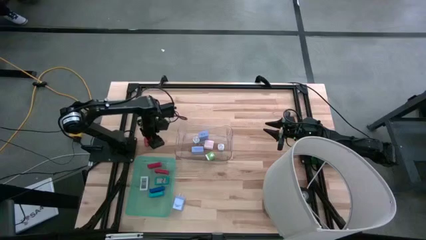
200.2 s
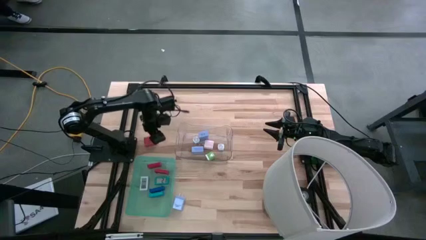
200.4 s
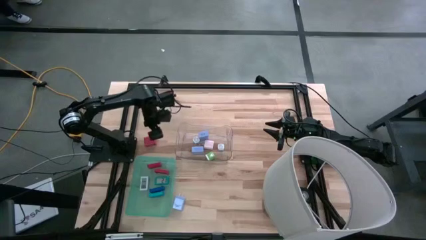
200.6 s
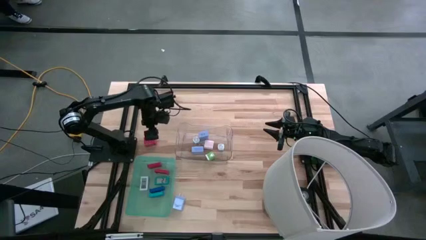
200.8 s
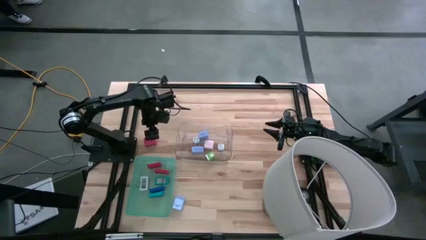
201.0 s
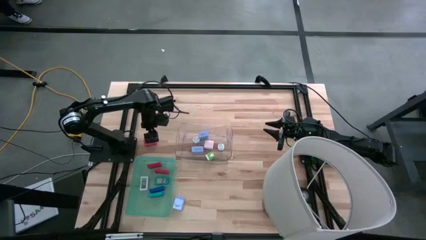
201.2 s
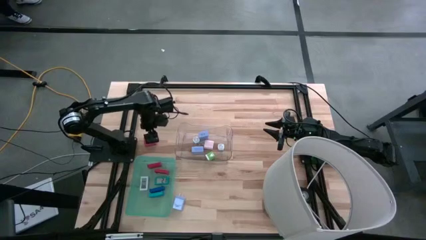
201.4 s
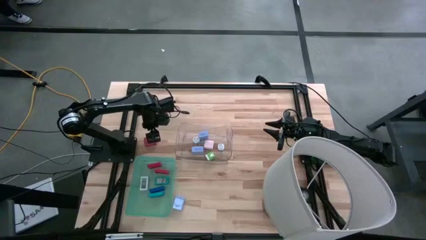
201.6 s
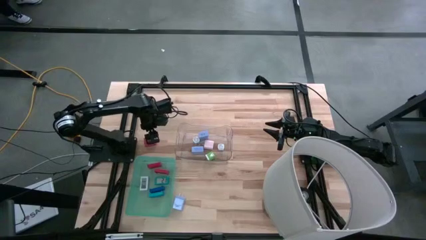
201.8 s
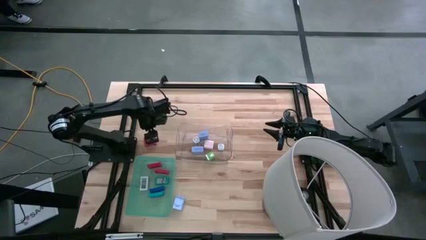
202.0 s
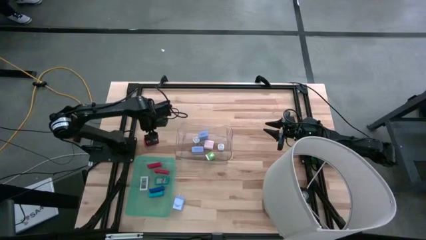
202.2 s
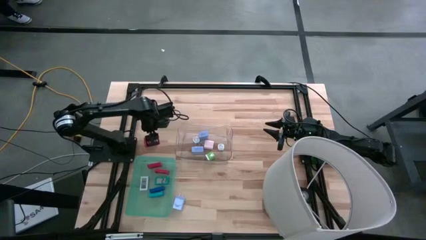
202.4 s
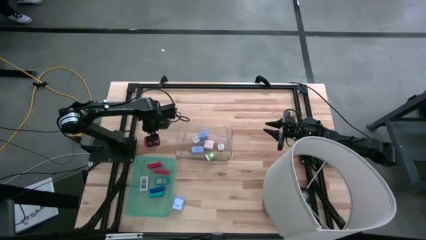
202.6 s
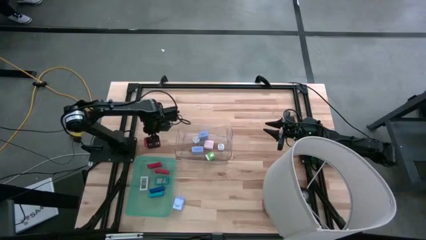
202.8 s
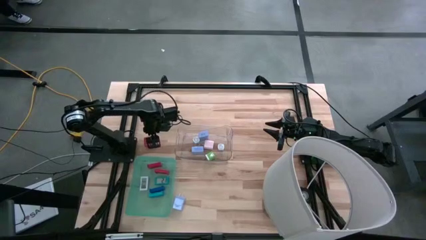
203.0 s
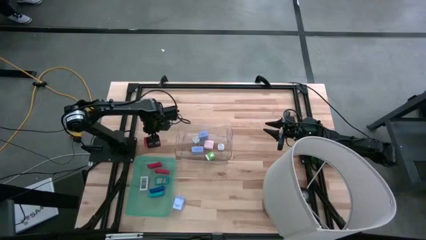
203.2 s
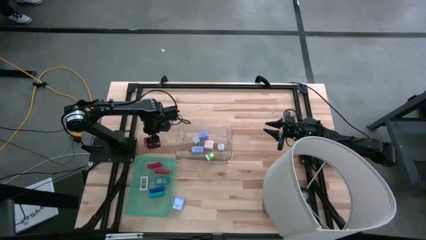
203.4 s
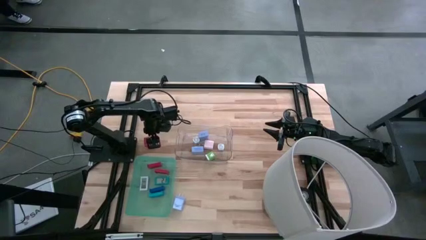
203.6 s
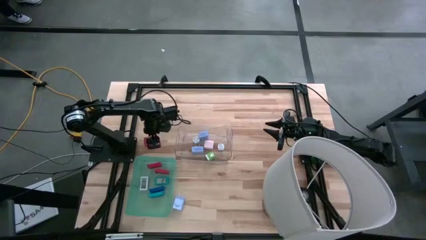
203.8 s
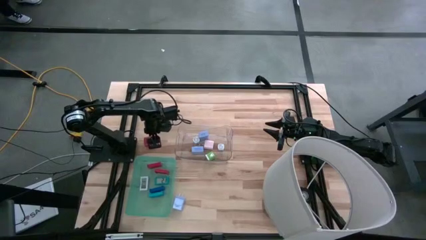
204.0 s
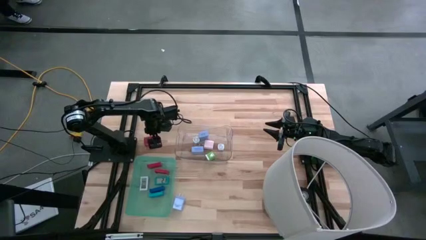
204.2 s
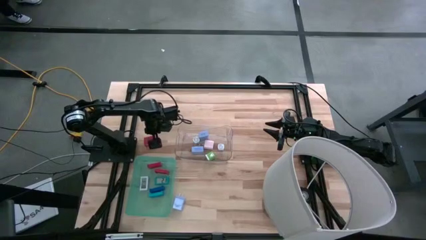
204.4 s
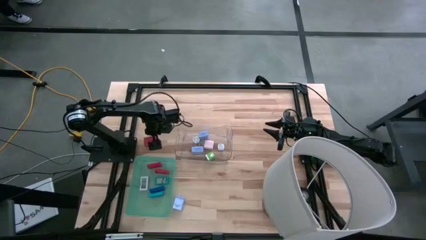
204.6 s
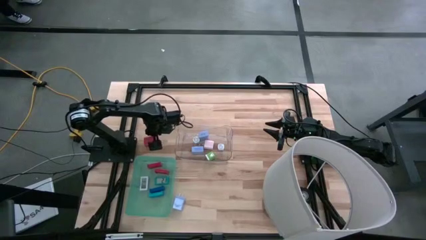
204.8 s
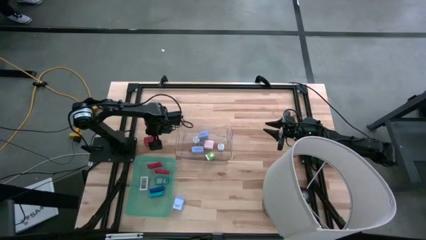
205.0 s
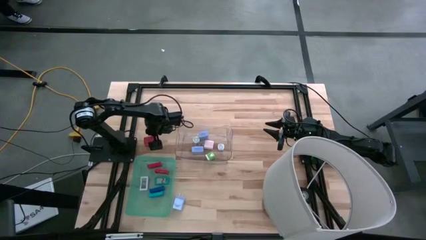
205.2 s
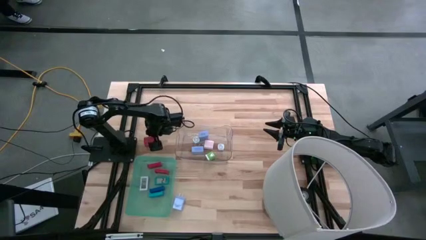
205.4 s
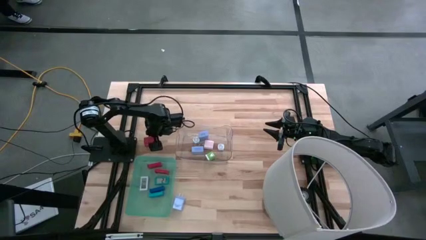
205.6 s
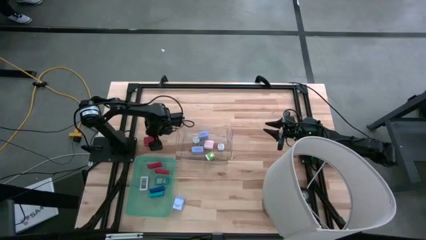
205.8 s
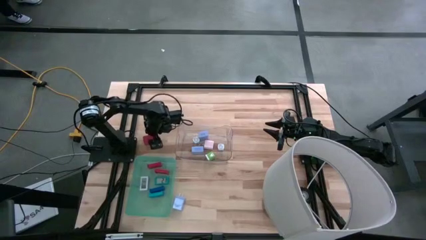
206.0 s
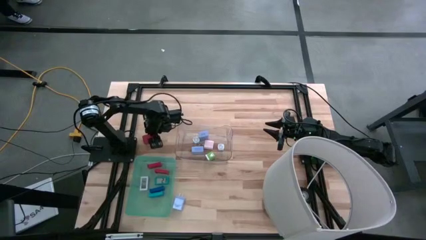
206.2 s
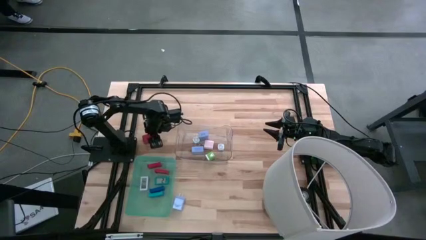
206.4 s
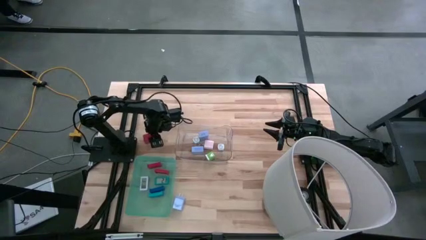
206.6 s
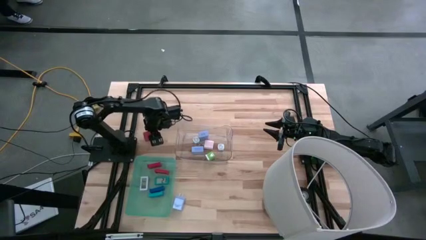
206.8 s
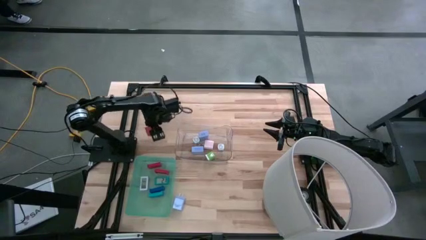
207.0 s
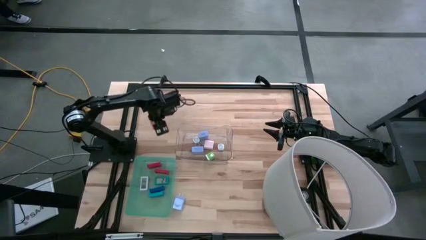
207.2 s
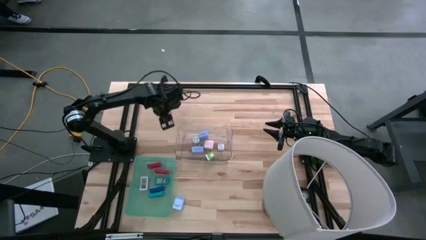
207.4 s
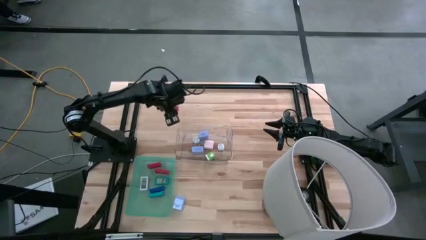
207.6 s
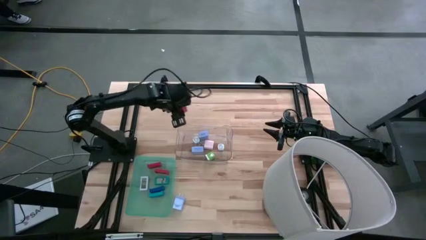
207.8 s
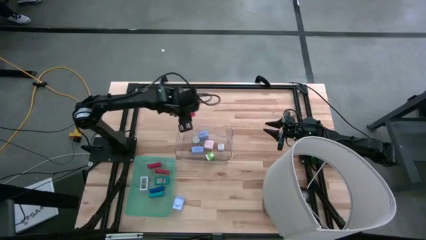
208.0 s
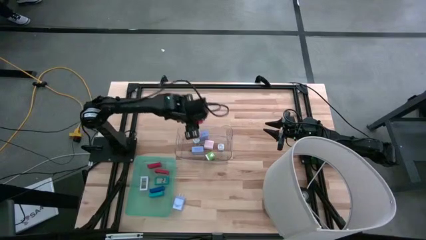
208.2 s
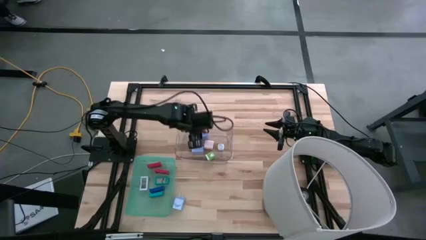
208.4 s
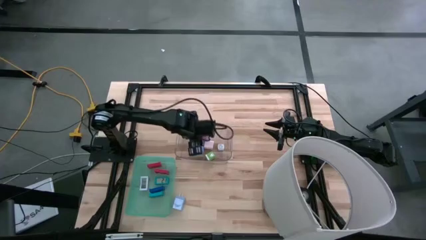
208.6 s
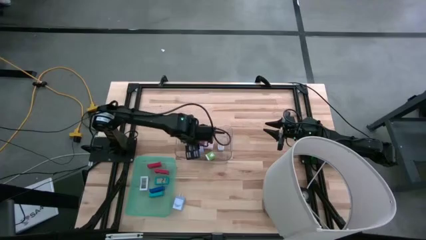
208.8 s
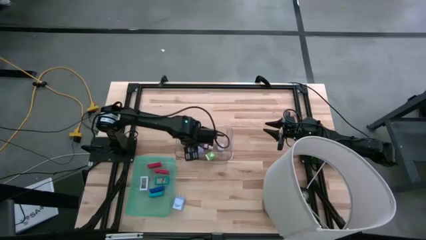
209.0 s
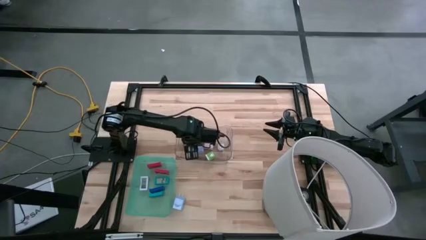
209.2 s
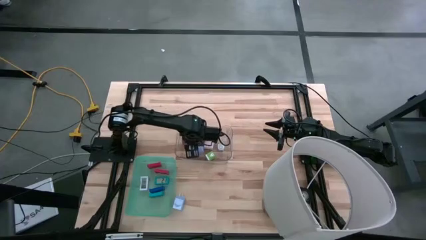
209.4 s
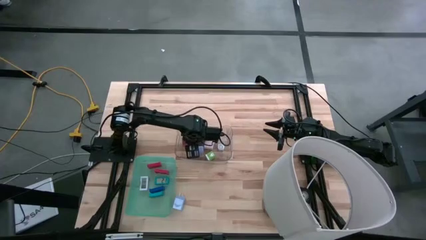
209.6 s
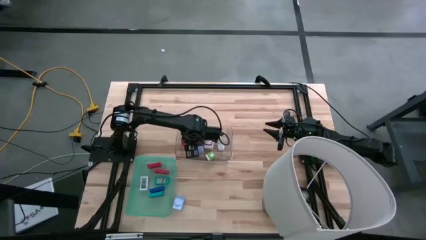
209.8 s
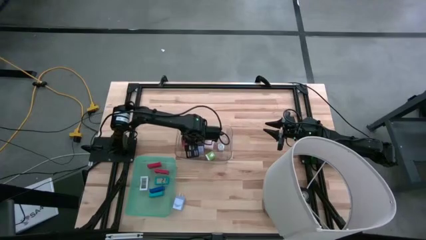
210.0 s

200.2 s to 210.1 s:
Task: Pick & Place Office items
Put the red charger adapter into the transparent bin

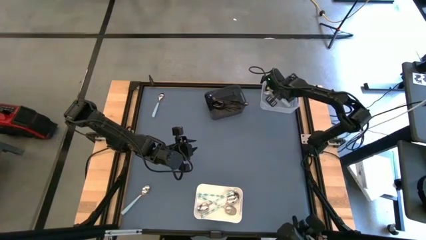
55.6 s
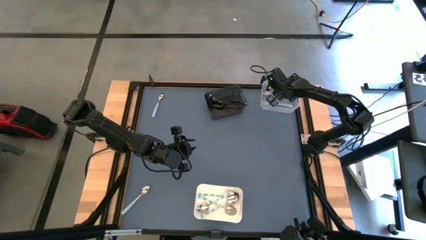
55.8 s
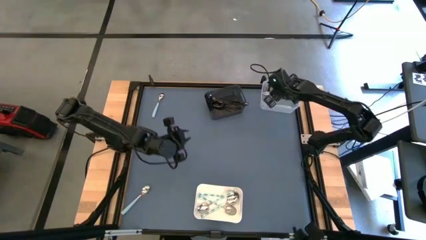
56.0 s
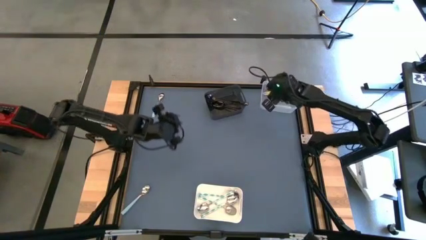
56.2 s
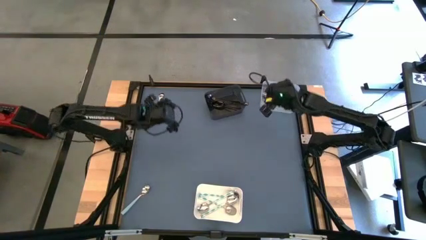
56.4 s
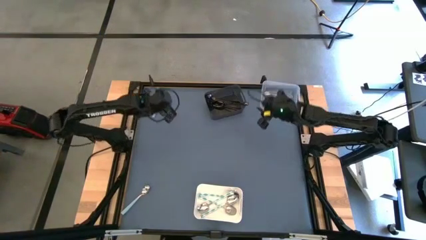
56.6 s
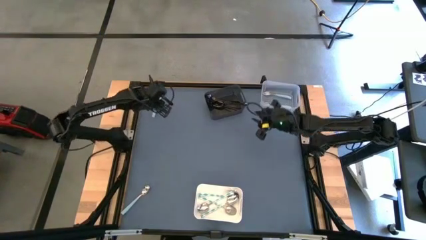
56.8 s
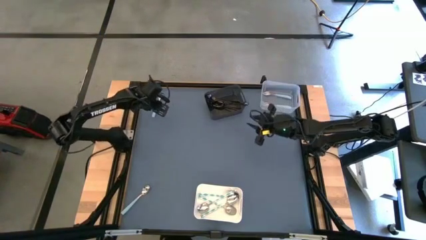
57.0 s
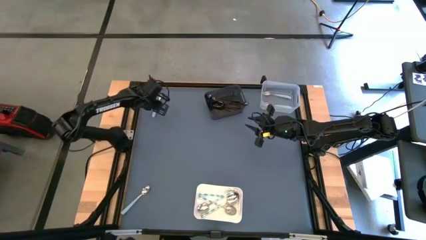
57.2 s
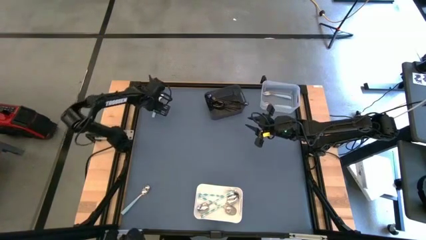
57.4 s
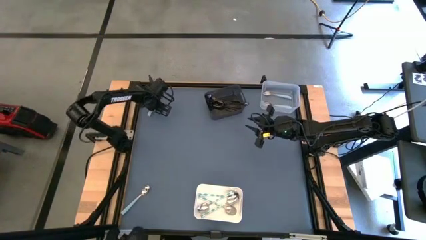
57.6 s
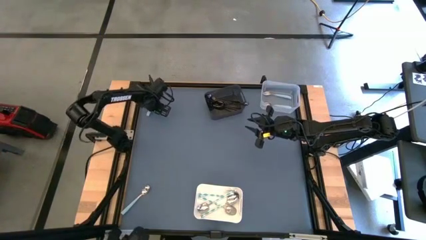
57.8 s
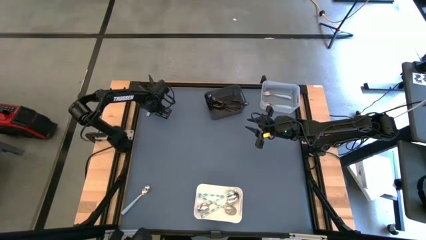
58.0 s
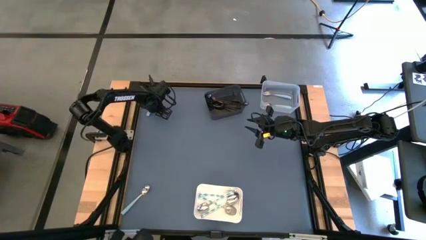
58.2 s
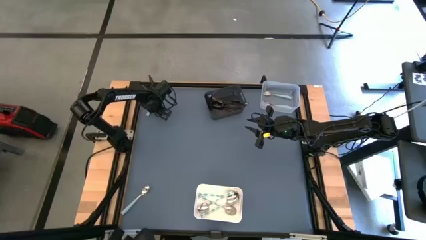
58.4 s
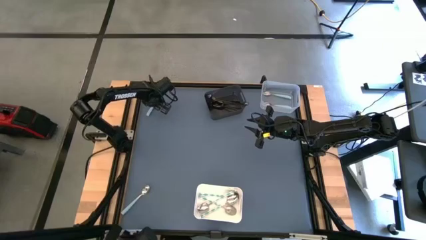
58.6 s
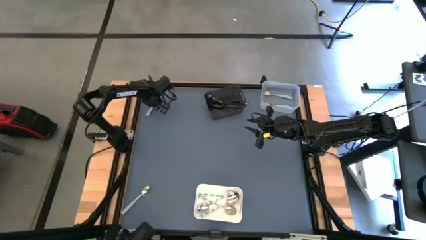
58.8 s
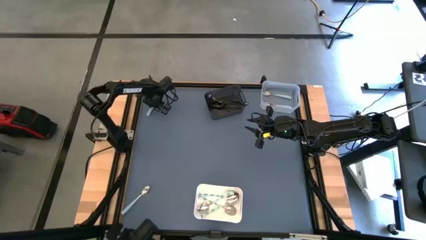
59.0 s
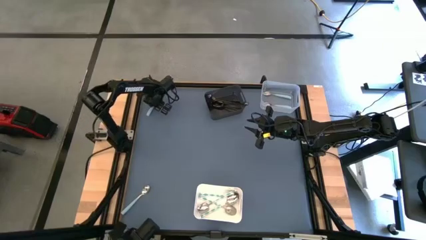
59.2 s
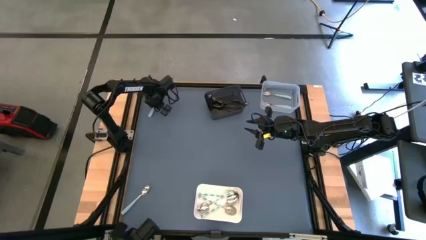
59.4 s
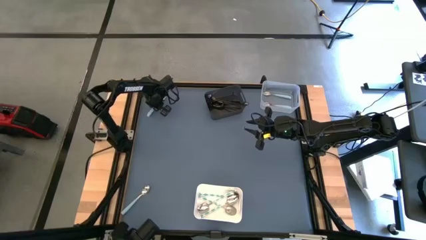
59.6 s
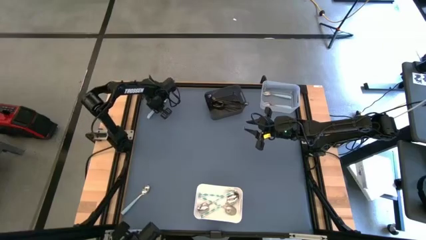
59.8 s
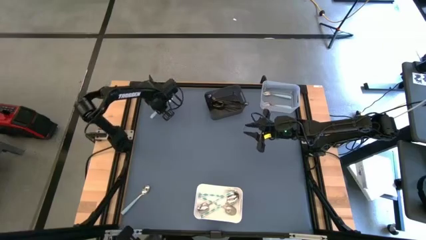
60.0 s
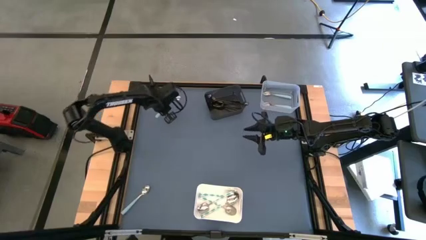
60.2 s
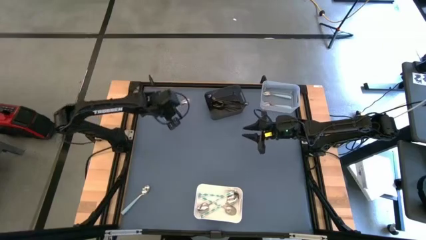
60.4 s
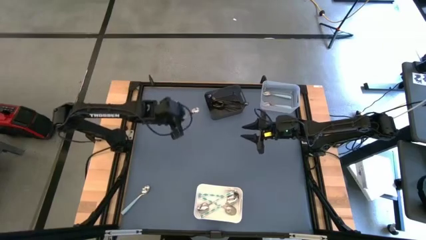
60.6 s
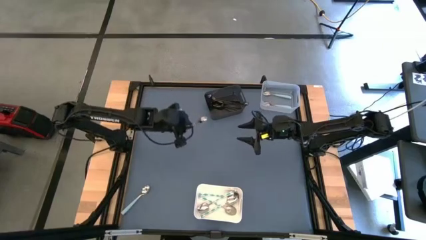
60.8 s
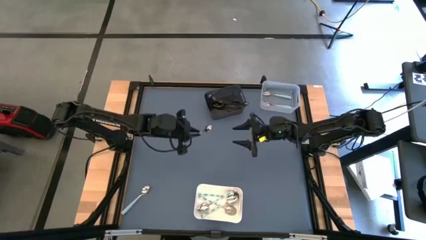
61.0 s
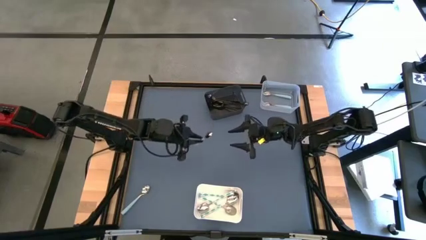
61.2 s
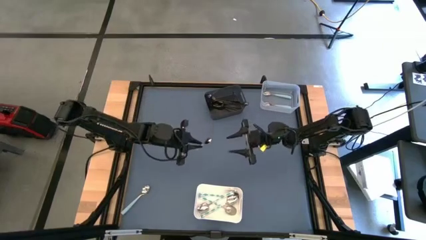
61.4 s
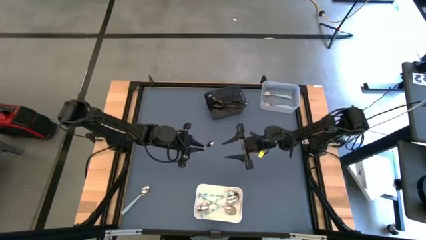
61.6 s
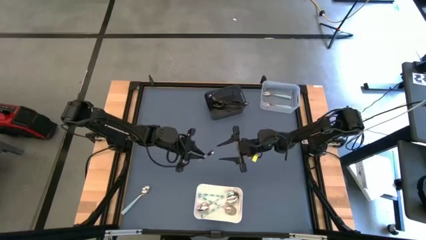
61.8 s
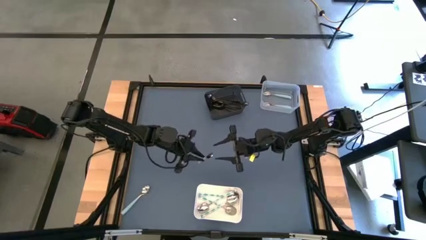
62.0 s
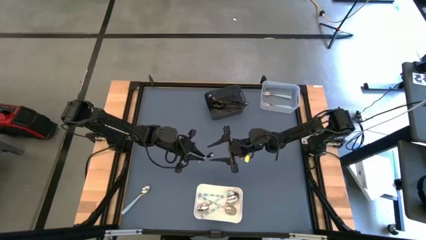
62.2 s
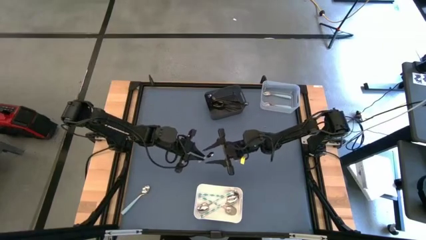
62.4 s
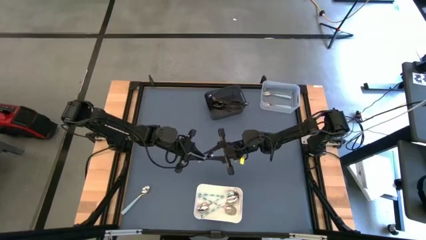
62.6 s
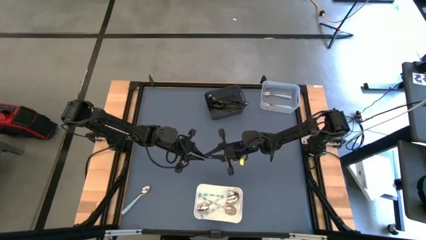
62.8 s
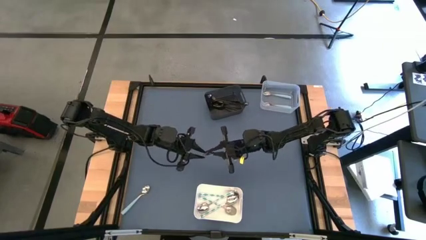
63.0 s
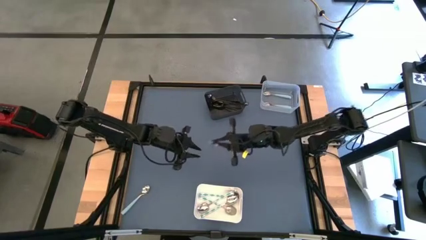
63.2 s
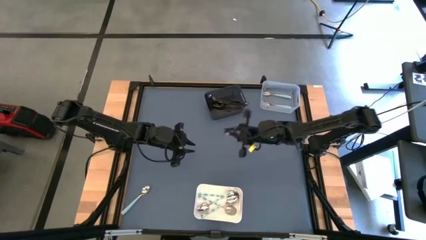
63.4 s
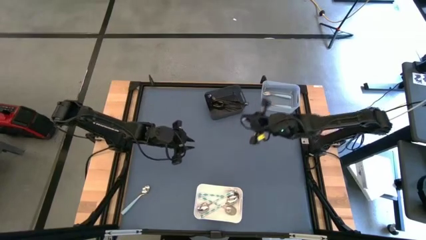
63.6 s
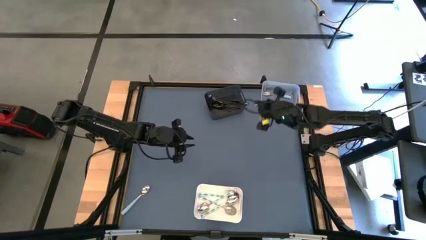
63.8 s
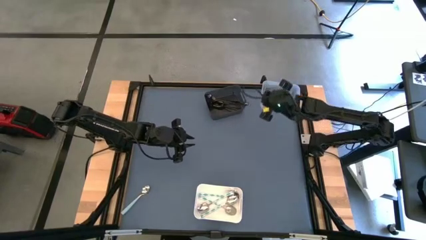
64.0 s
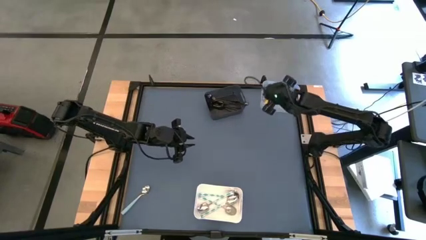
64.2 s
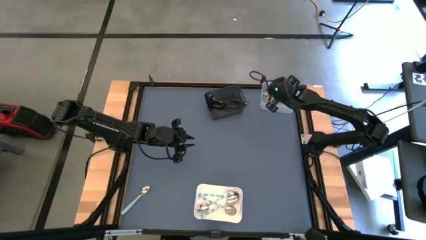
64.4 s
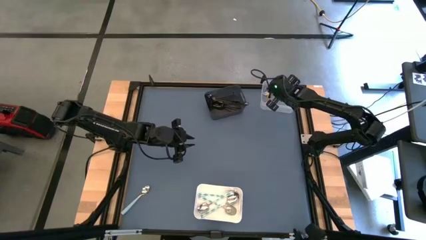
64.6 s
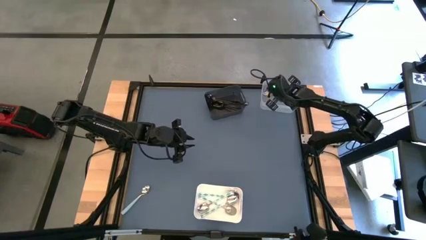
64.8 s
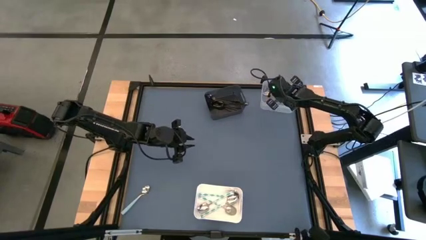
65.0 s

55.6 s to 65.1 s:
Task: Sort silverware by color (type)
Put the blue spoon into the transparent bin
